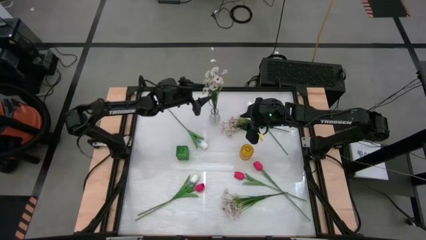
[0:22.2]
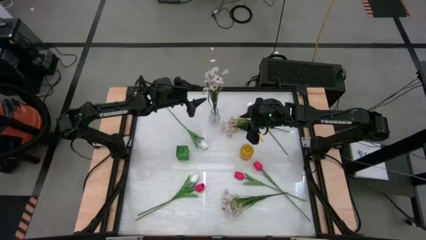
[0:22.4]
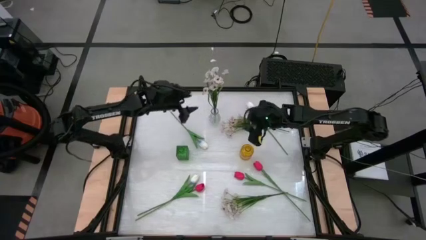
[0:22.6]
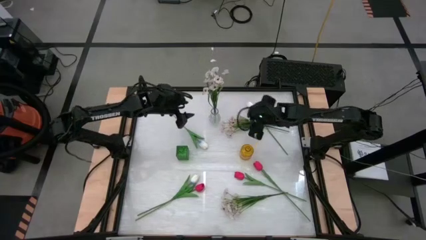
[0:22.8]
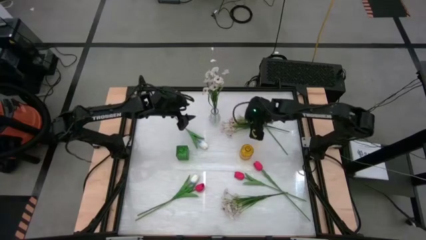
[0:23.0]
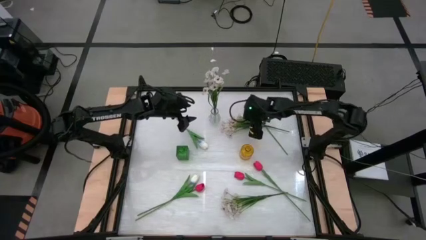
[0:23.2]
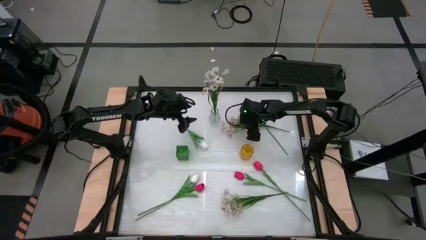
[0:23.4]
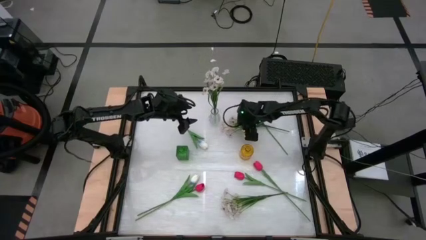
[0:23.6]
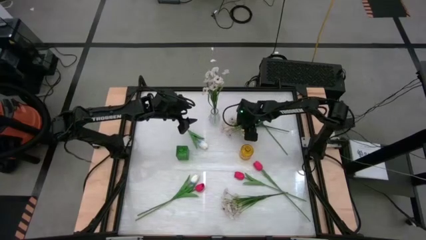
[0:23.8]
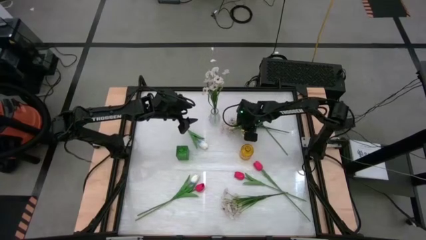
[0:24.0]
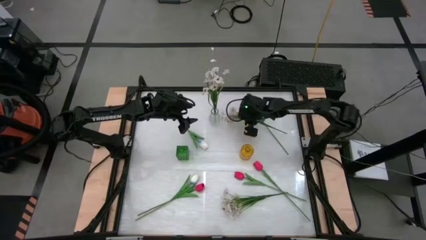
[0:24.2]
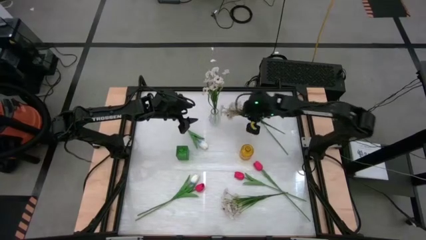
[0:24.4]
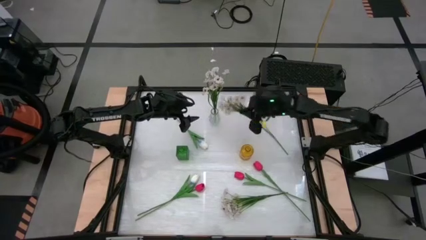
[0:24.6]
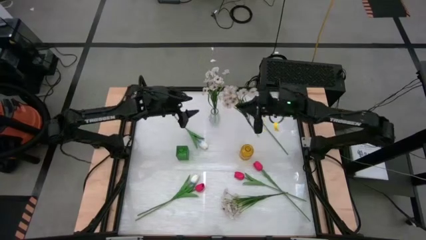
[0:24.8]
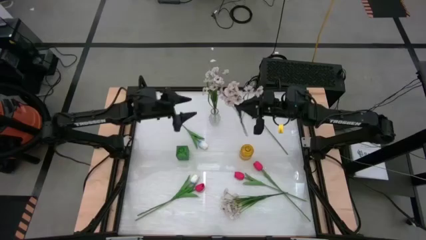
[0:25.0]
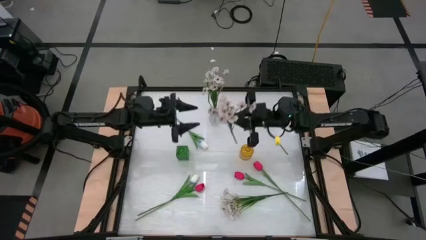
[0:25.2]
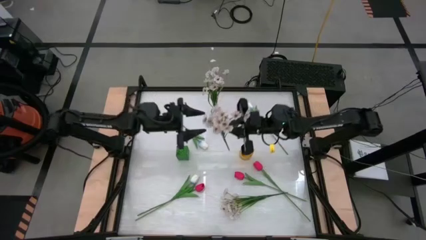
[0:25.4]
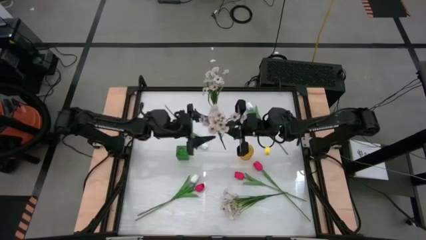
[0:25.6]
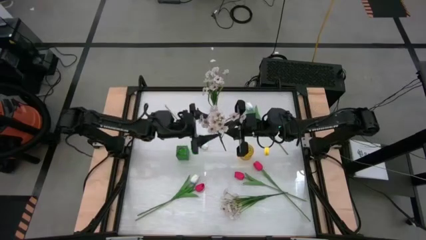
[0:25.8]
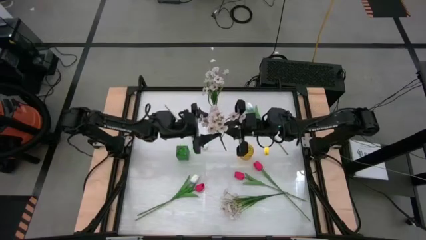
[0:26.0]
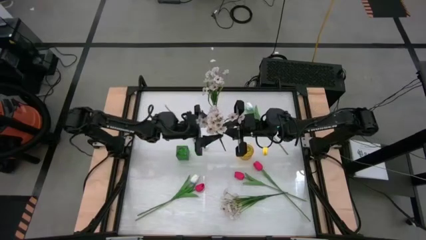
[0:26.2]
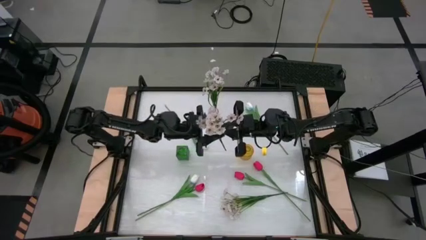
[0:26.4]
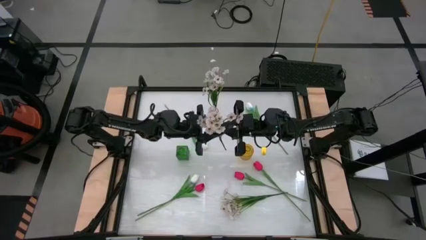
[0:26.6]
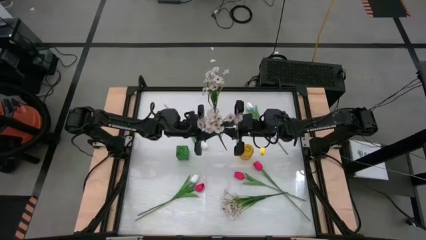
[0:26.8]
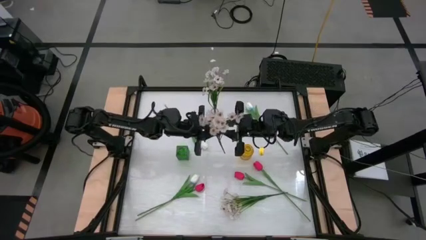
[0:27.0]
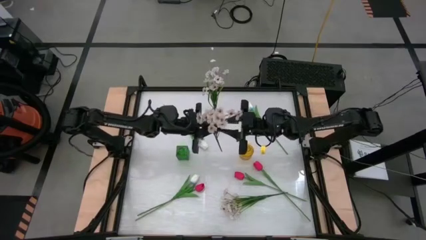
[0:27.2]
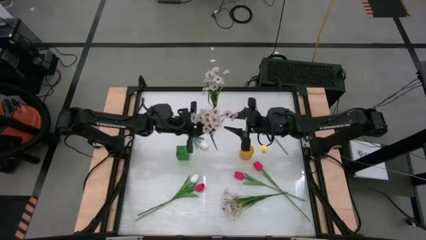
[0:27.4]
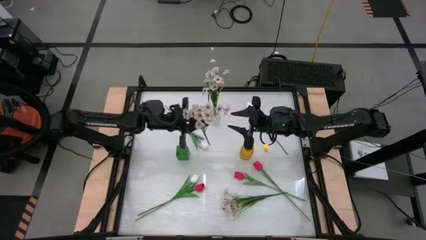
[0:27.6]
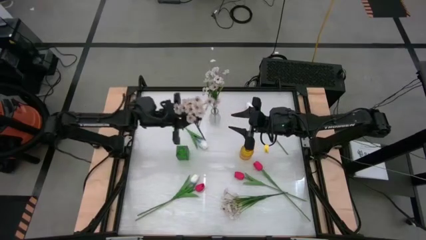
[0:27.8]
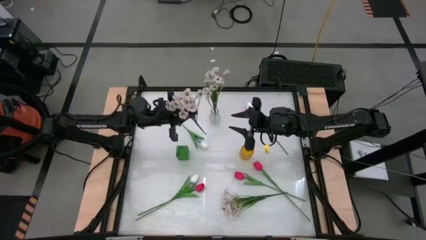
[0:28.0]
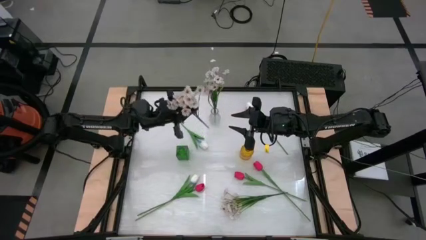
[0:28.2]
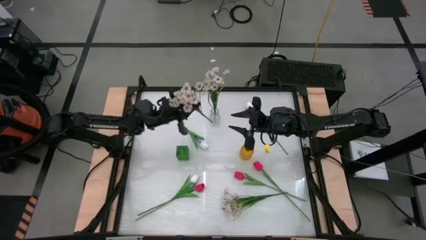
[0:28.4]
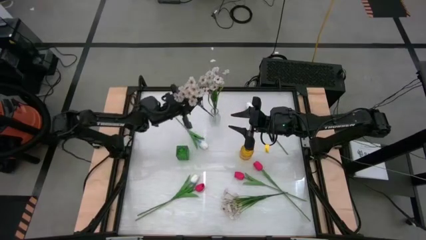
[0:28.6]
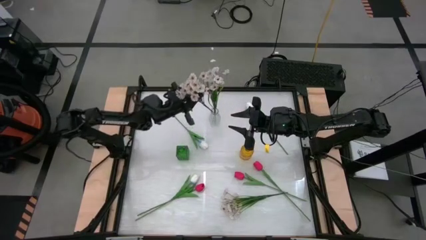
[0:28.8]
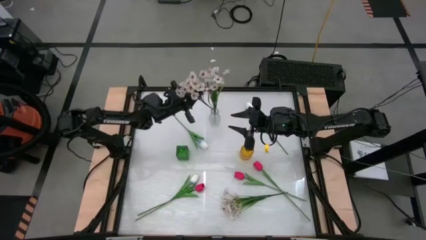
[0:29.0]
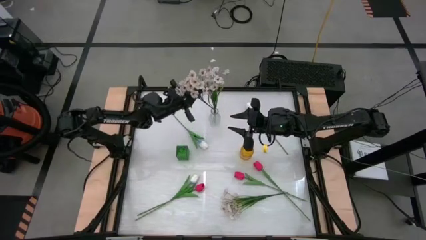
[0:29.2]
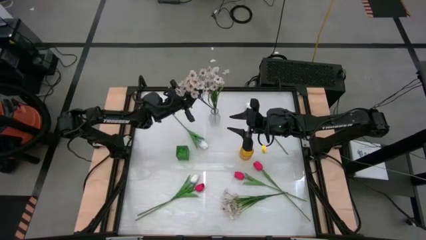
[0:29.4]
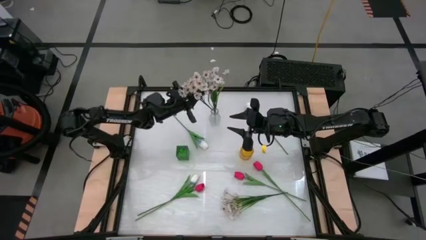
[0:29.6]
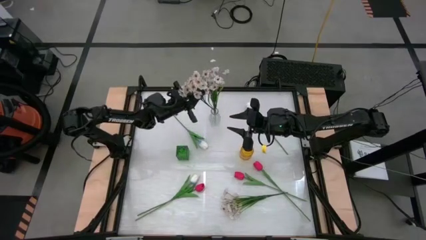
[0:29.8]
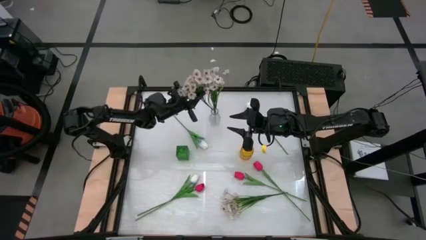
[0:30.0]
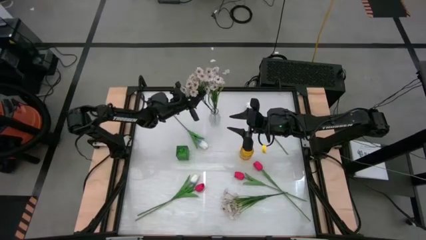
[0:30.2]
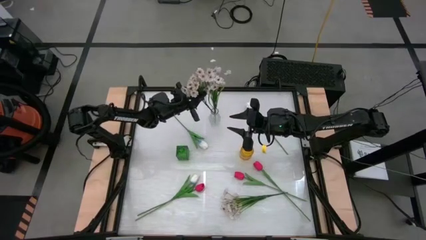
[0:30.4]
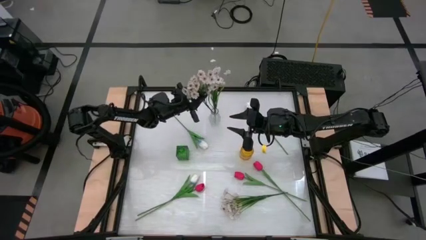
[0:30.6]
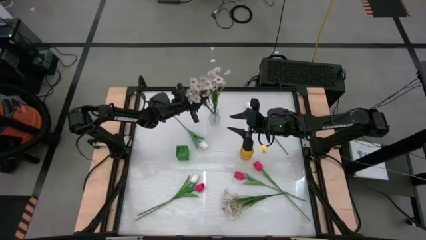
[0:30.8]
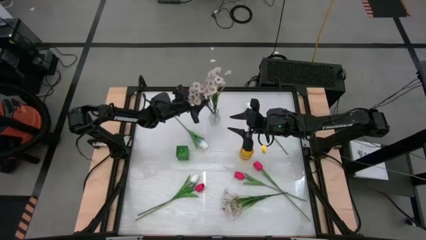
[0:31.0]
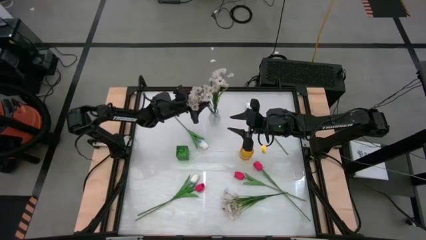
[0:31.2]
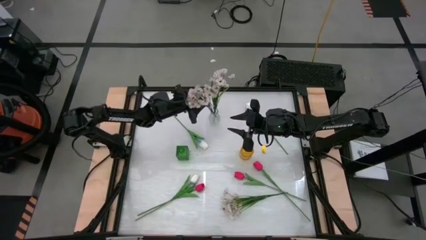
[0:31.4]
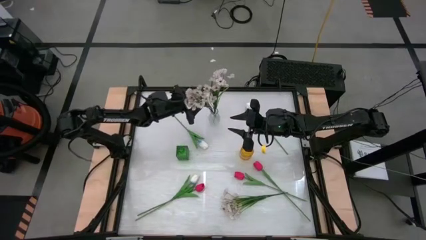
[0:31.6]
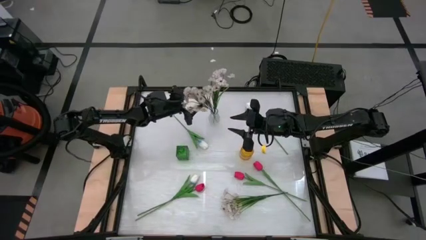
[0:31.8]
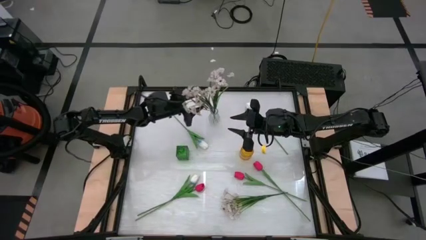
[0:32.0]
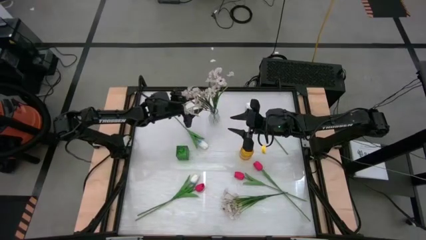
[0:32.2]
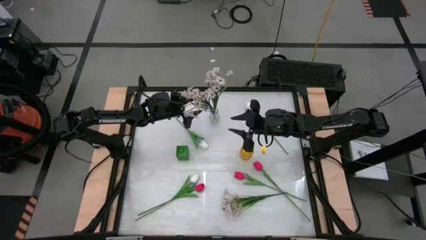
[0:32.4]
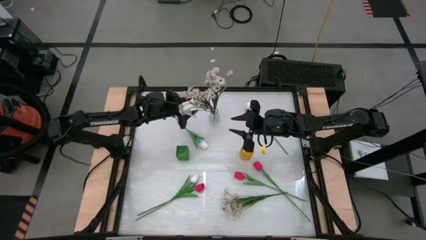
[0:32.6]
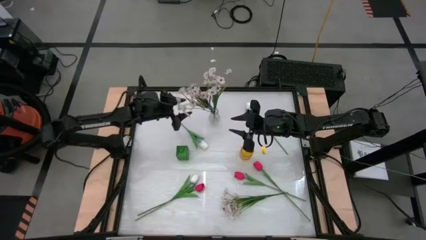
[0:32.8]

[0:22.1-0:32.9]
Task: Sort flowers into vase by color
Put the top white flowers into the transparent vase
